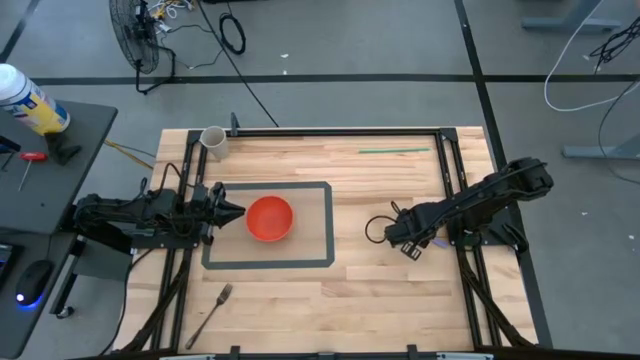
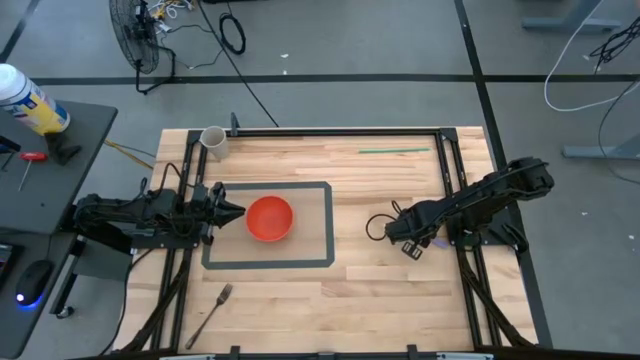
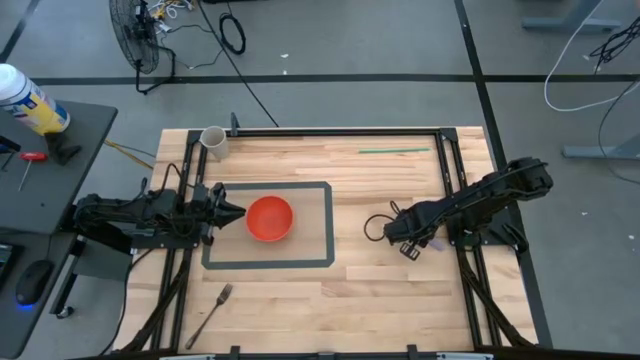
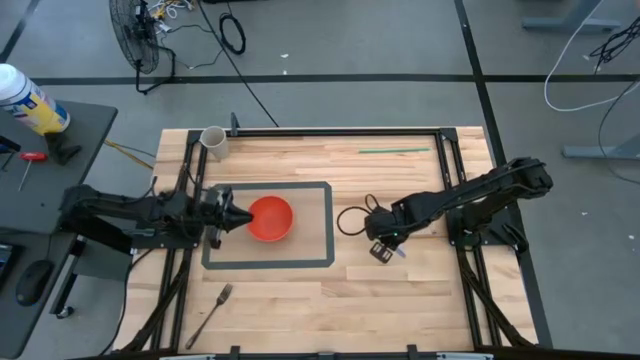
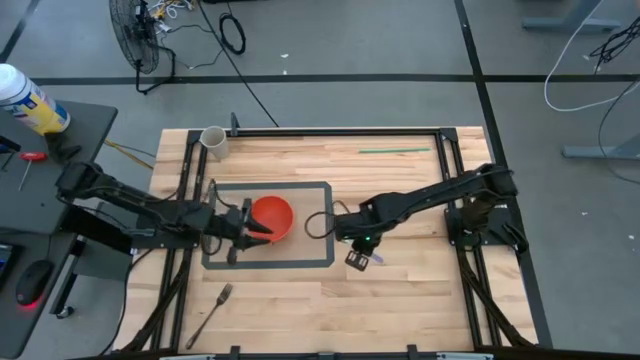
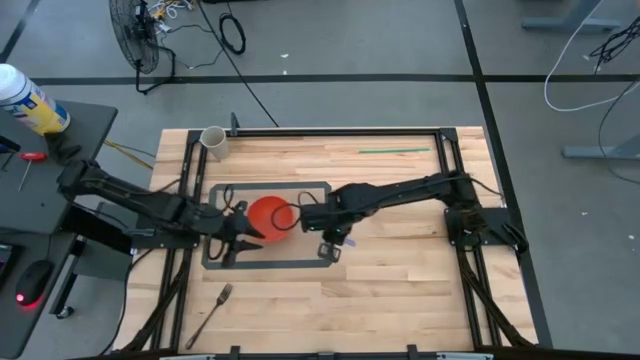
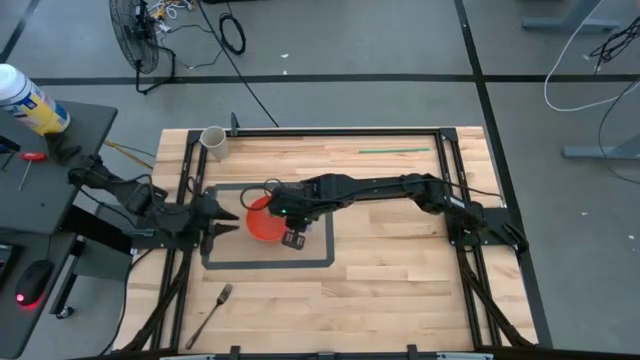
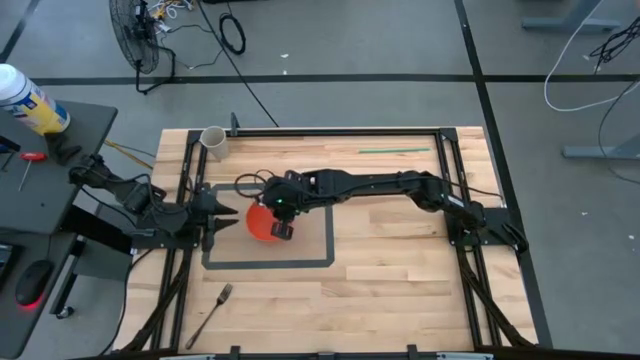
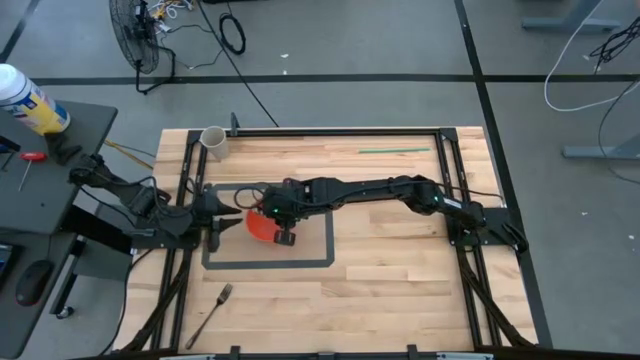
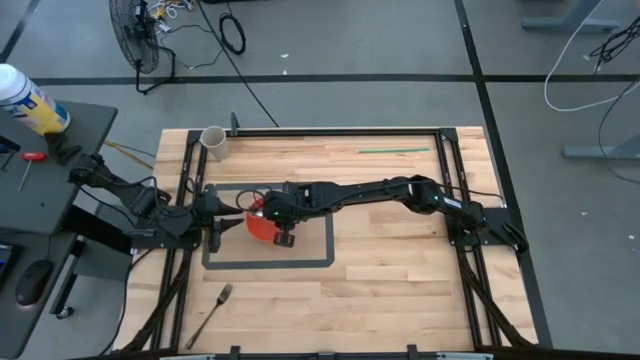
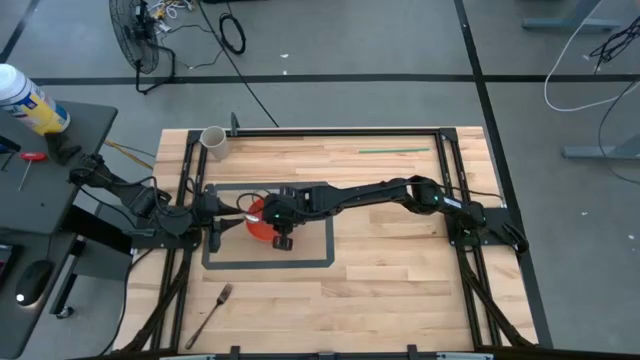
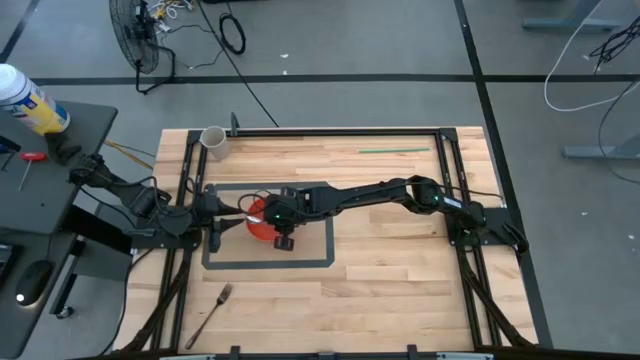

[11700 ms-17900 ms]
Task: Pick & Place Utensil
Put the purple spoon into the orange bowl

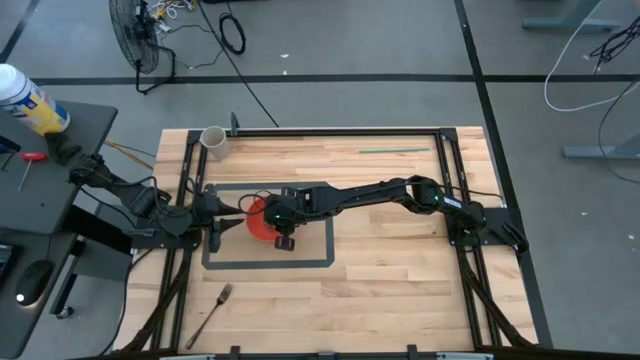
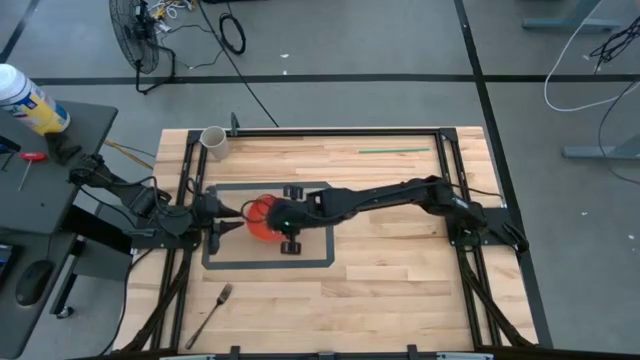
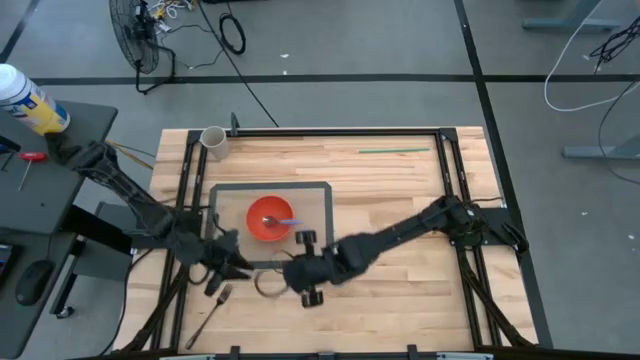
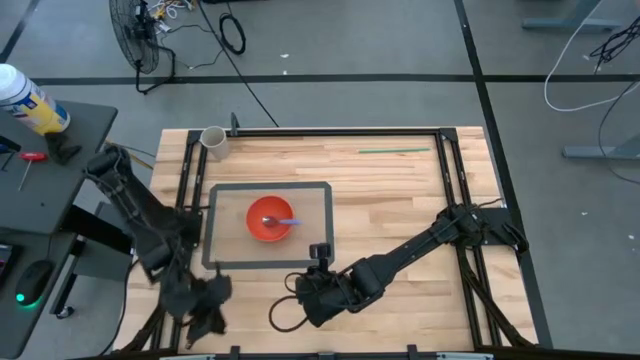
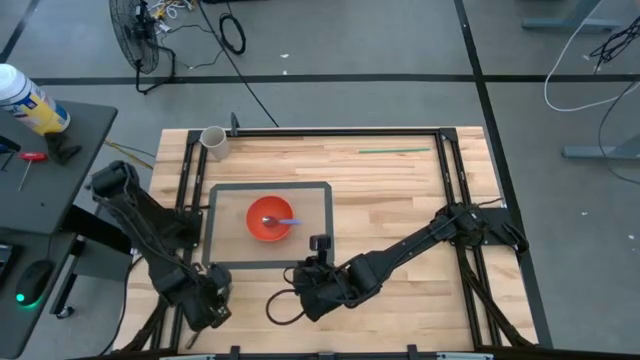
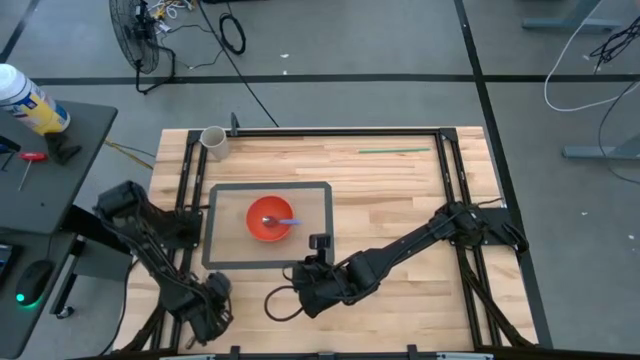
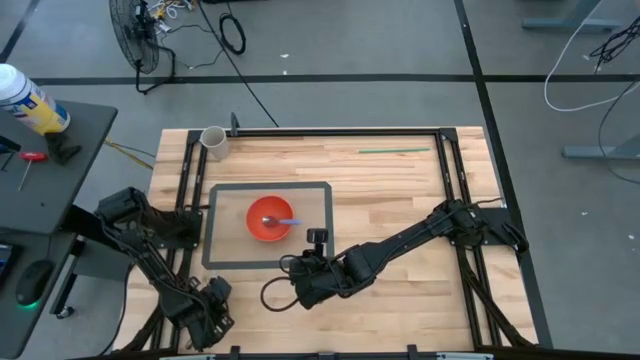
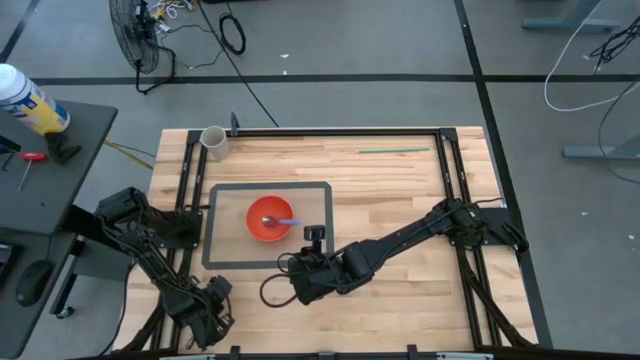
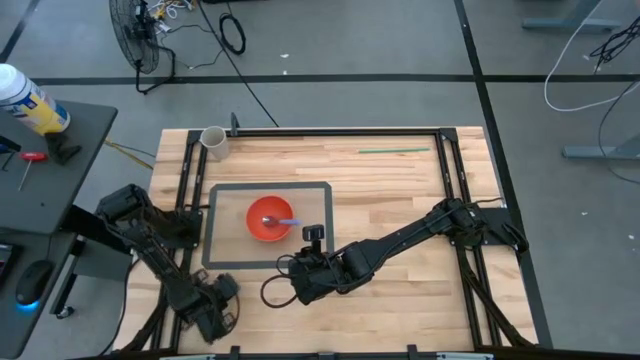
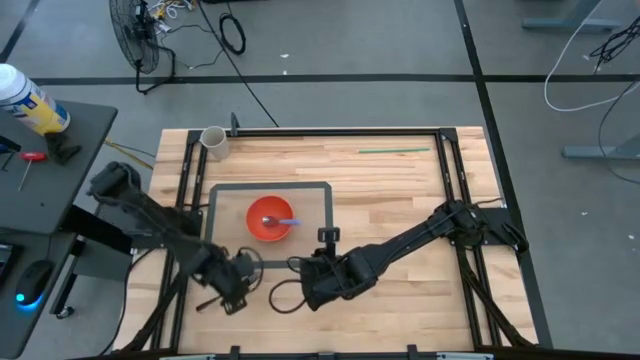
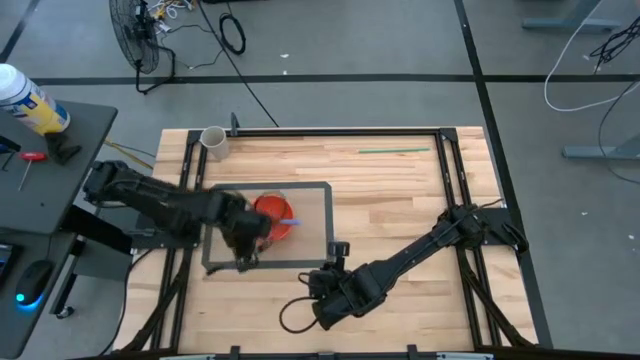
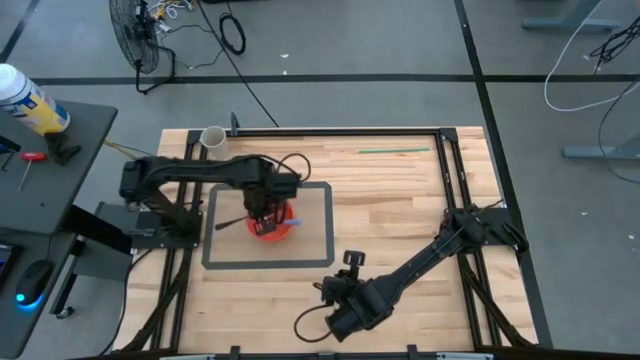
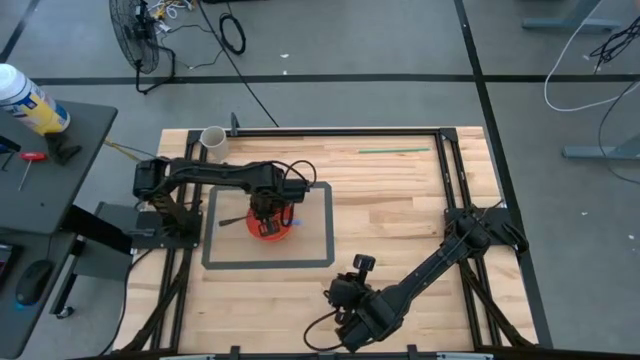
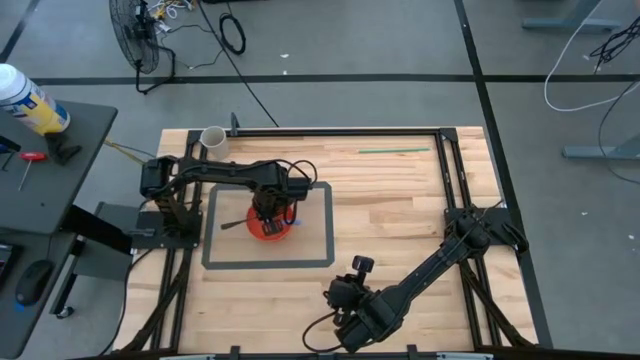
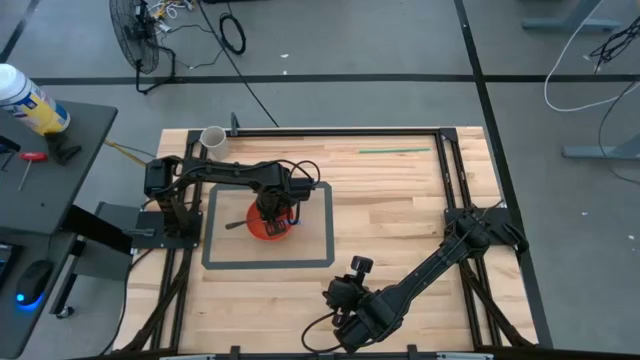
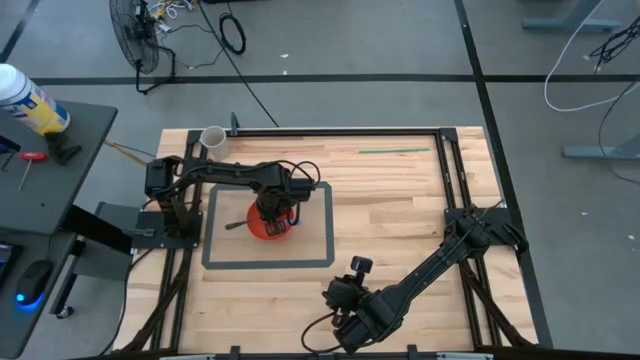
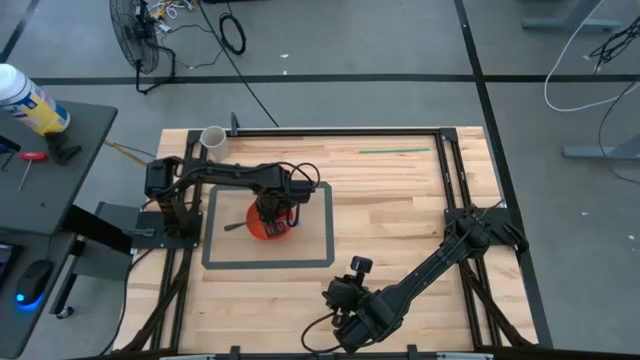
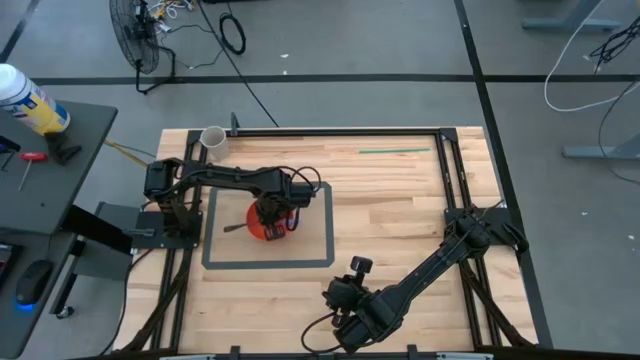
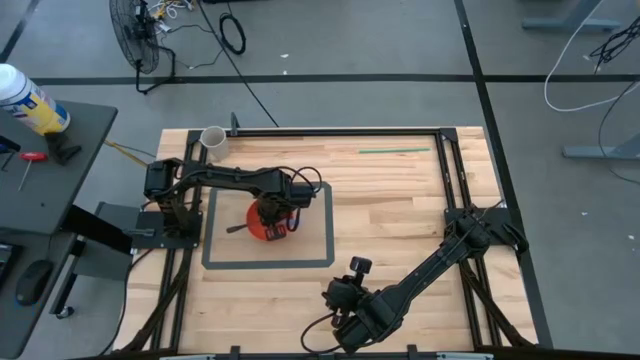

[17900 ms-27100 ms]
Put the silver fork into the orange bowl

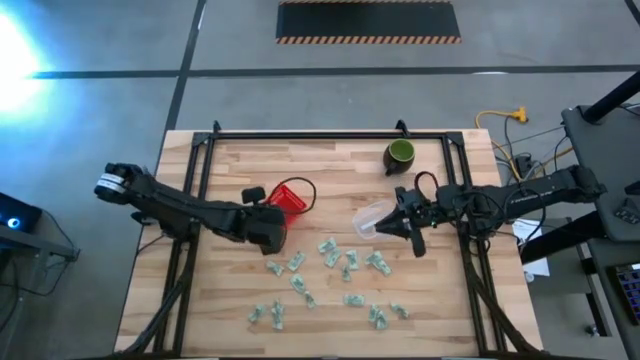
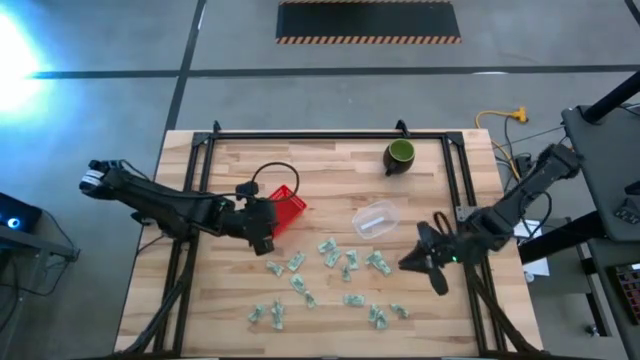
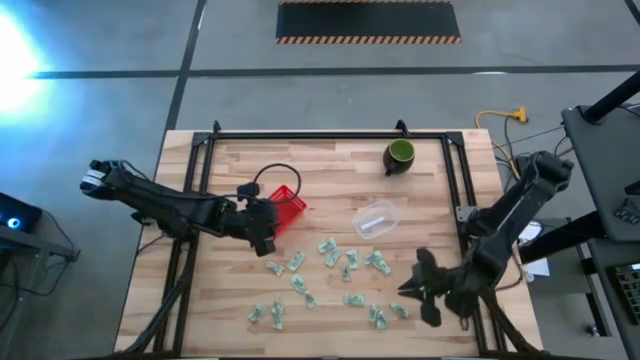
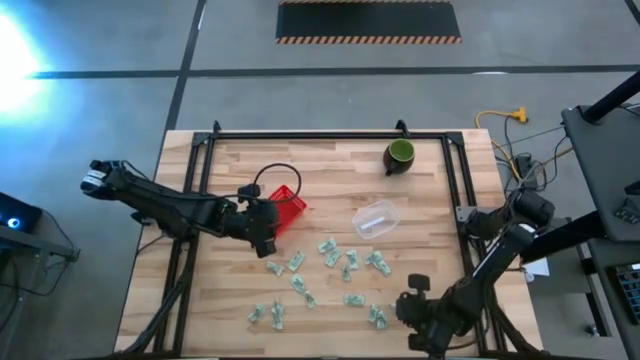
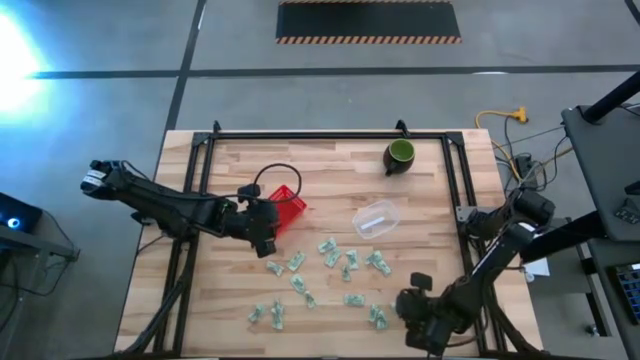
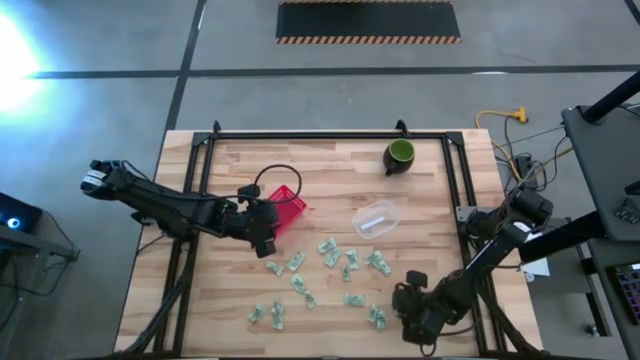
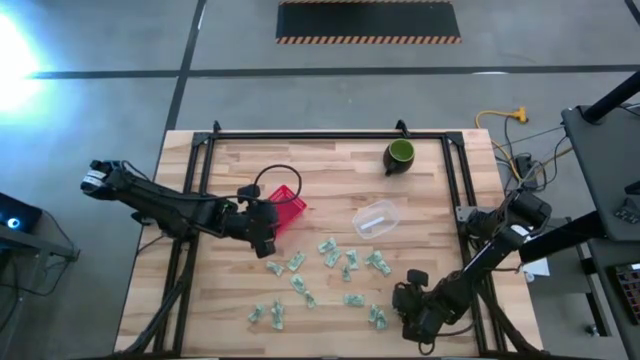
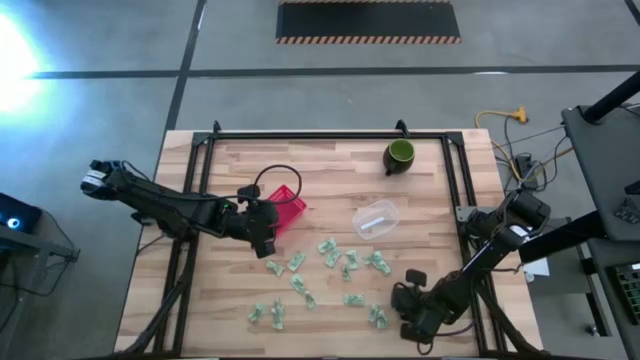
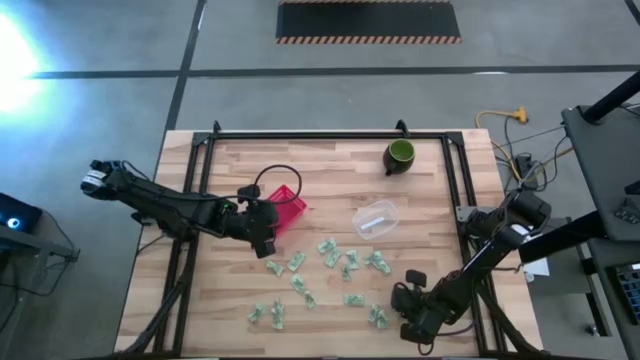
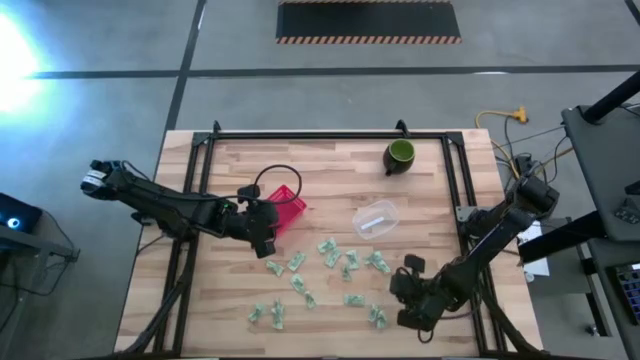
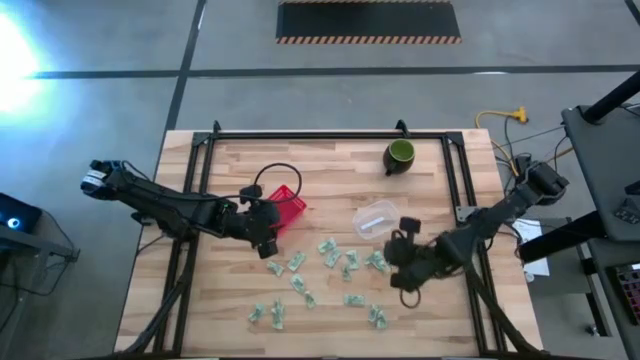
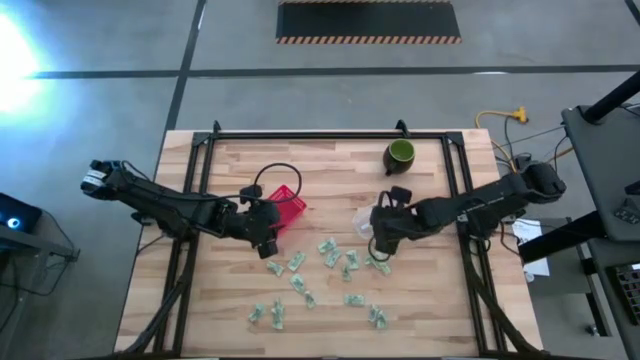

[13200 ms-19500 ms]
Task: Pick and place items into bin
Put the stevia packet into the transparent bin
